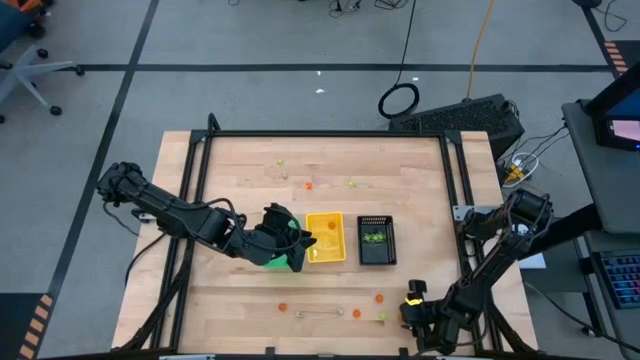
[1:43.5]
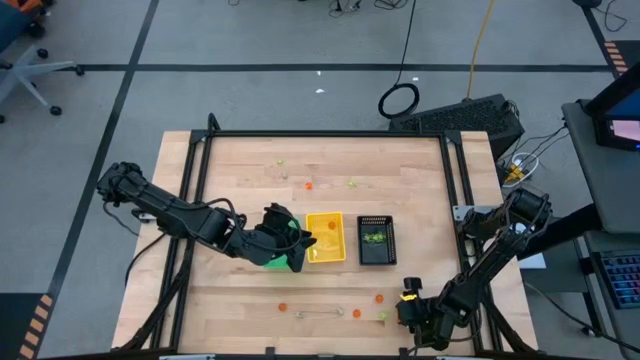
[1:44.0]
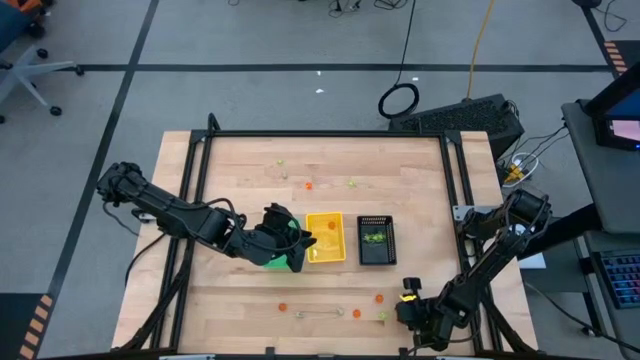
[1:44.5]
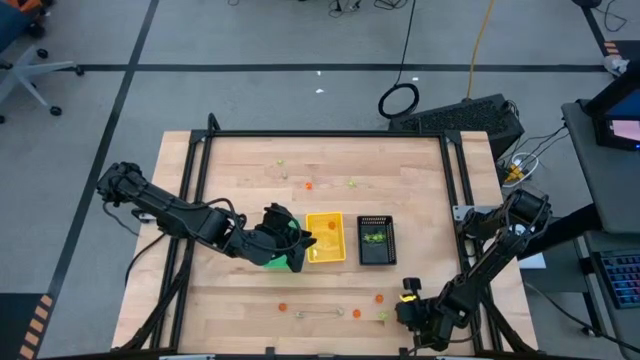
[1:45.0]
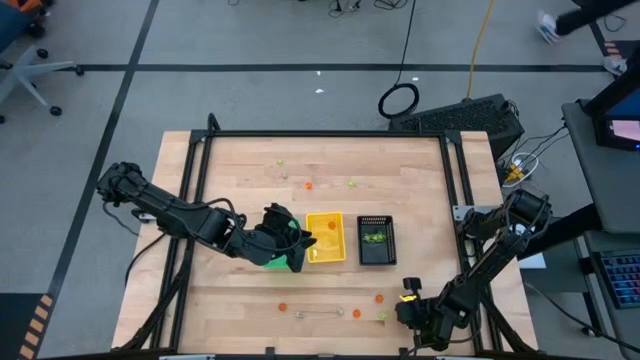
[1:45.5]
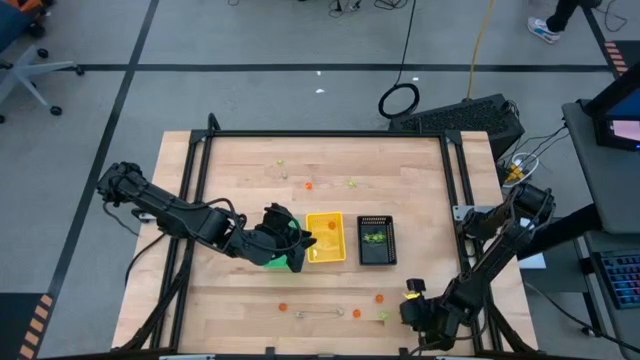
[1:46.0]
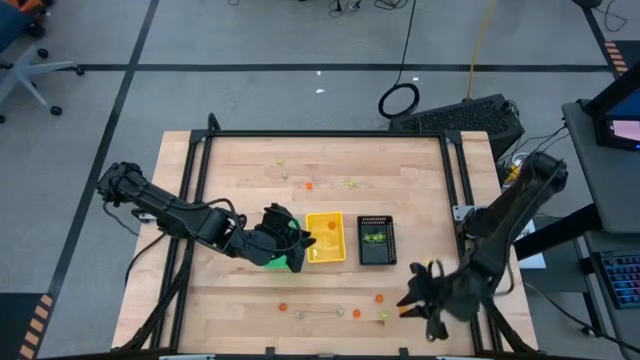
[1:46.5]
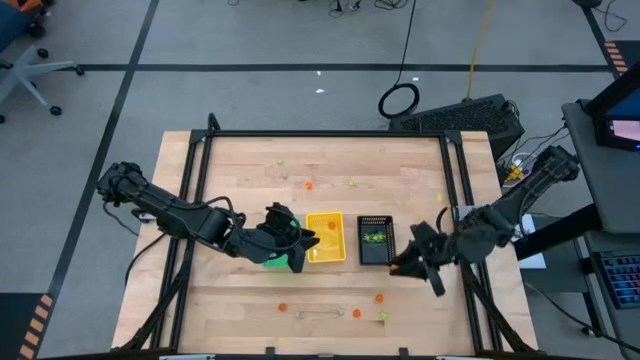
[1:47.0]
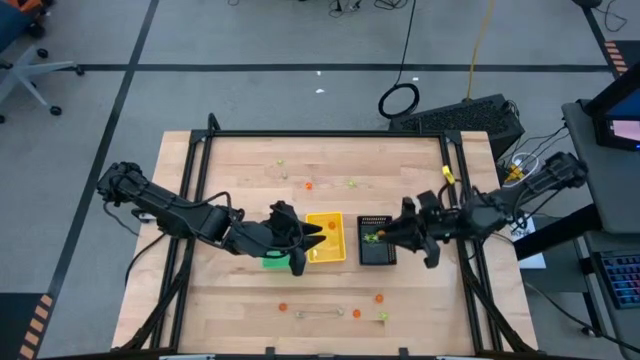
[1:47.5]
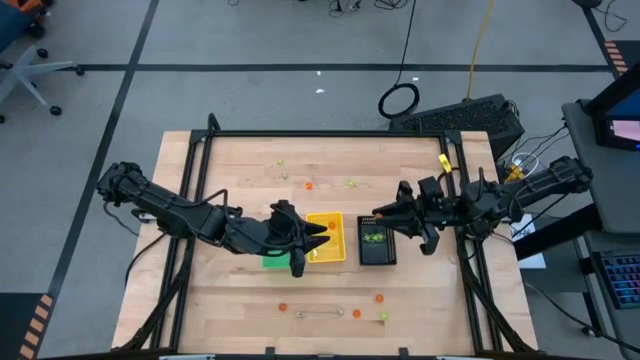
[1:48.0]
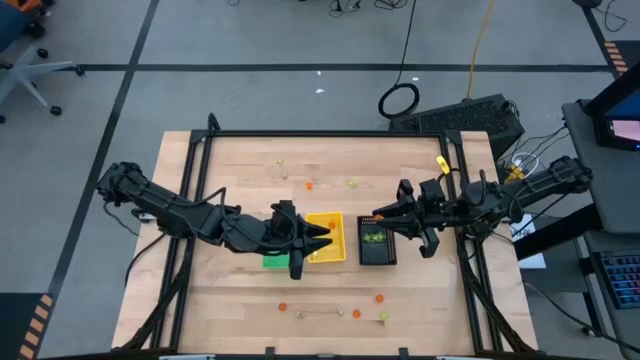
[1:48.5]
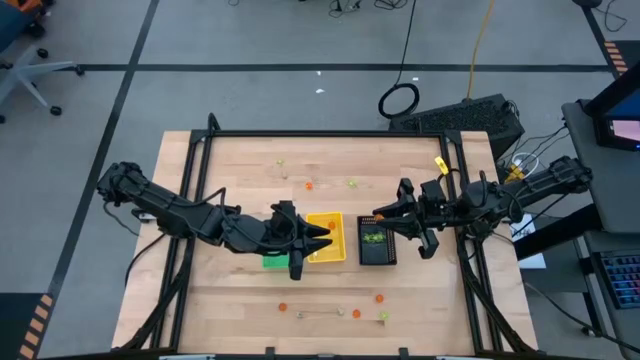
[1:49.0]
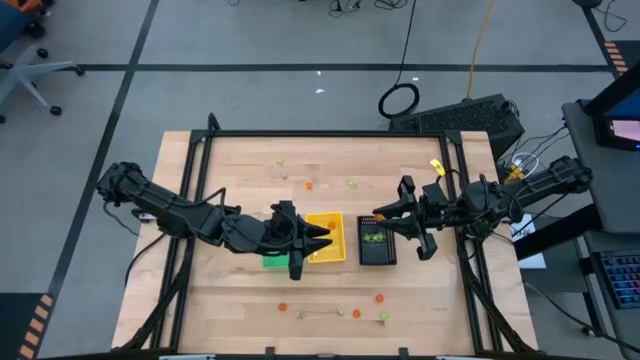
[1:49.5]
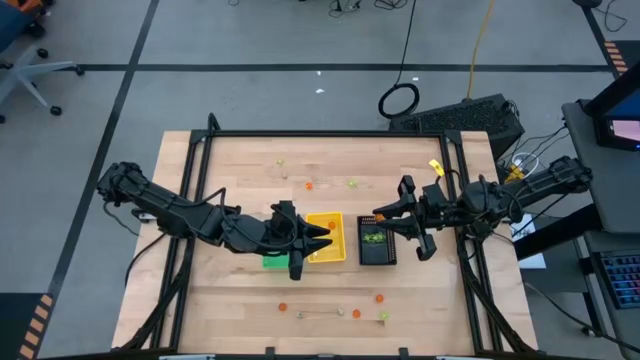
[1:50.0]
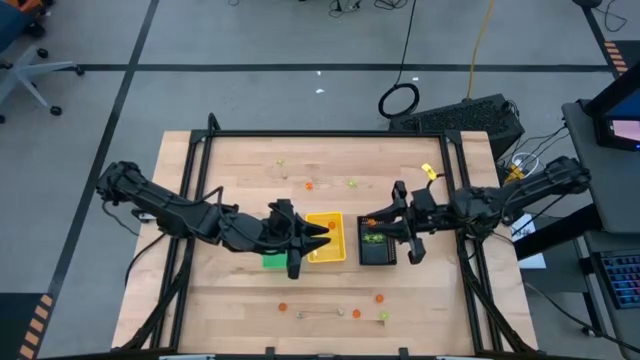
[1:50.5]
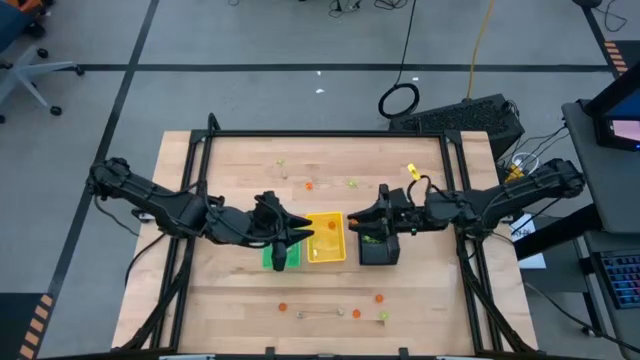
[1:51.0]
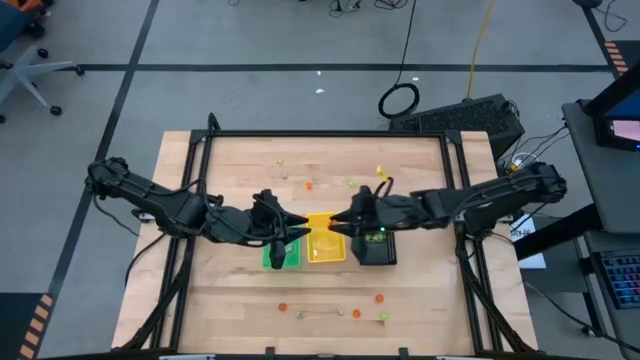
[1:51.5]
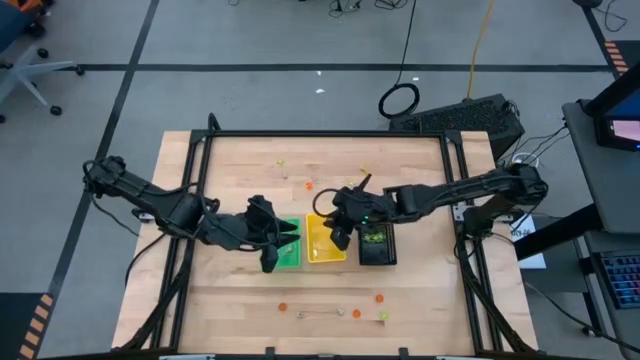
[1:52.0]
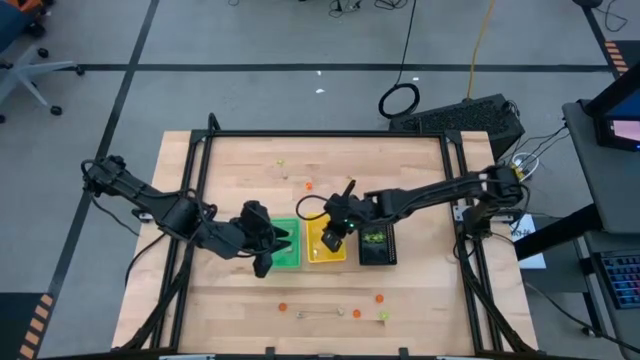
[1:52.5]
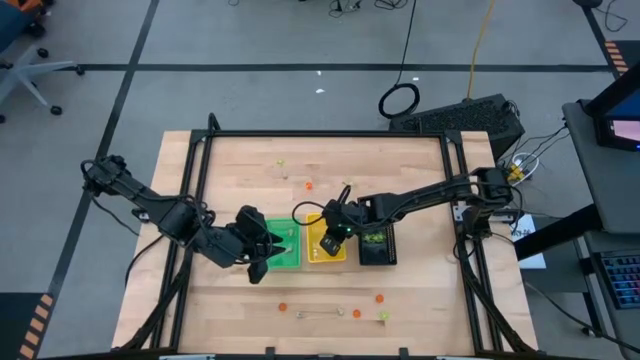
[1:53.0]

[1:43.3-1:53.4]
Task: Sort Halloween decoration
Put the orange pumpkin toy into the yellow basket

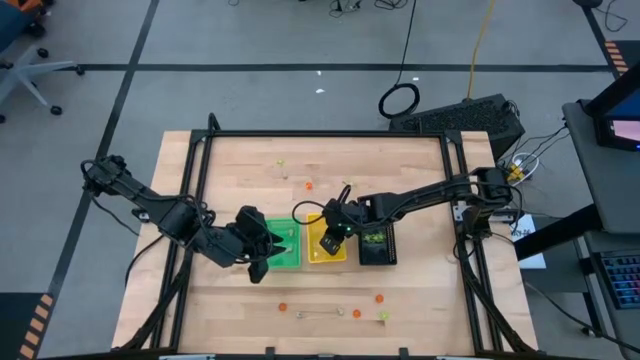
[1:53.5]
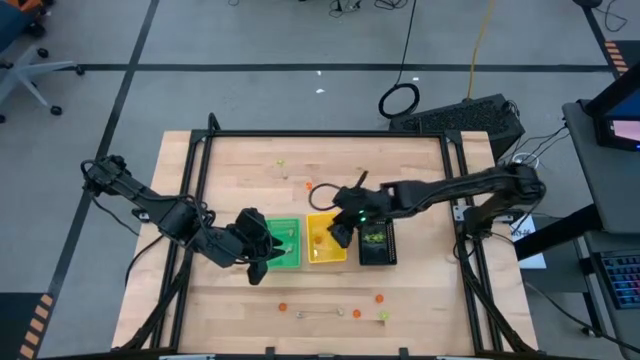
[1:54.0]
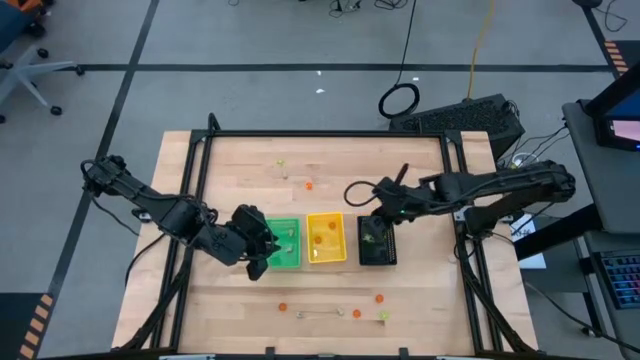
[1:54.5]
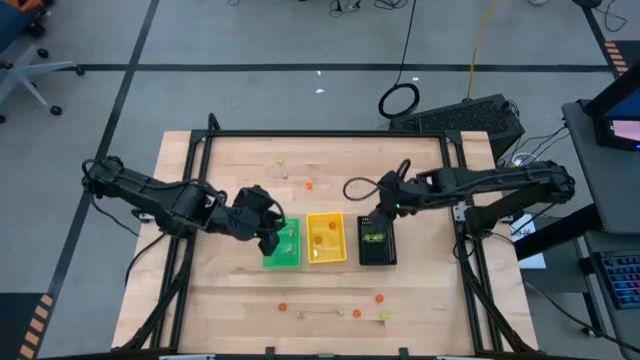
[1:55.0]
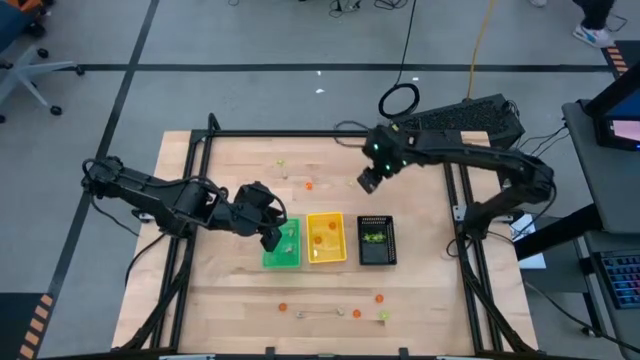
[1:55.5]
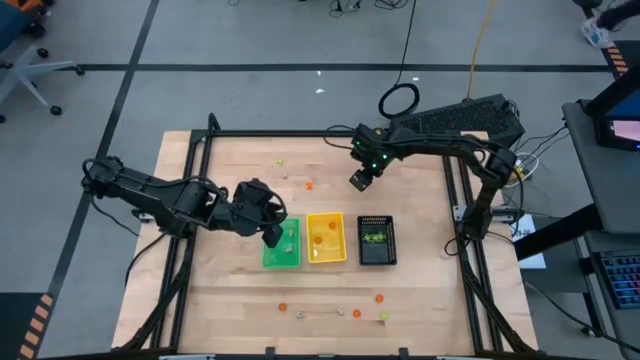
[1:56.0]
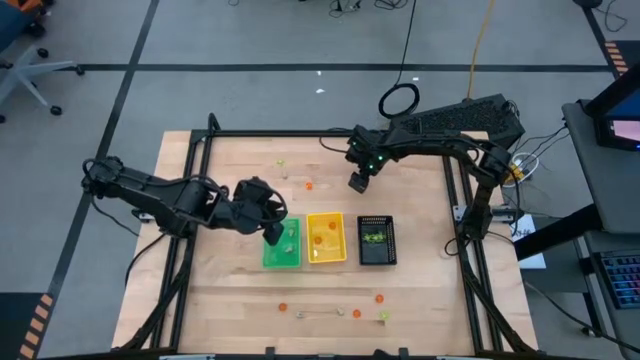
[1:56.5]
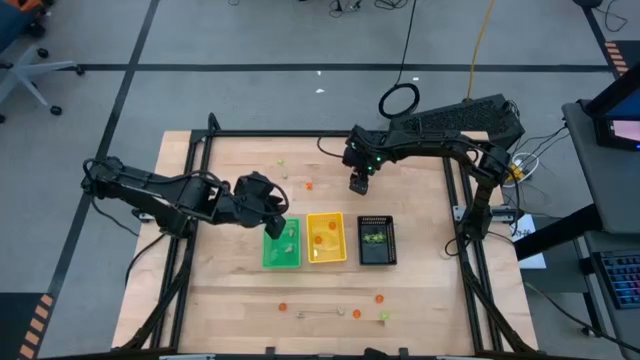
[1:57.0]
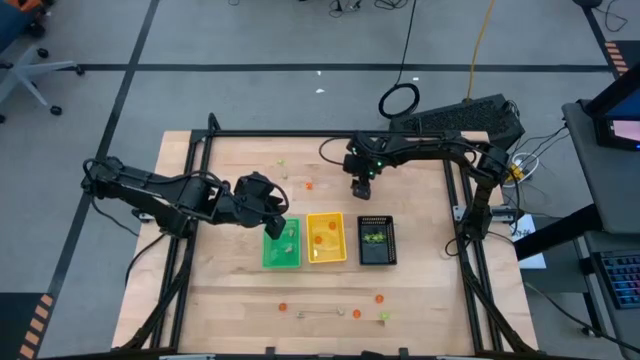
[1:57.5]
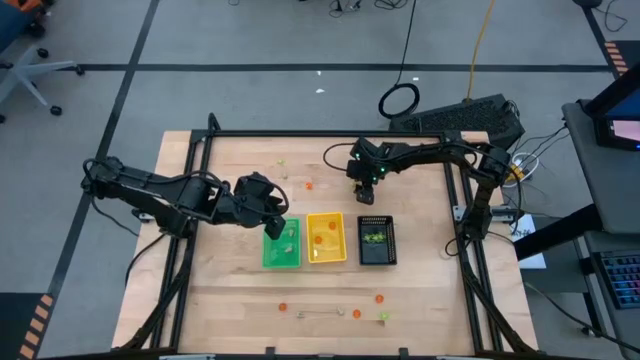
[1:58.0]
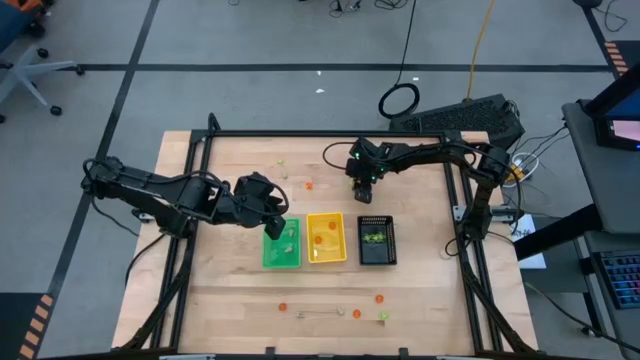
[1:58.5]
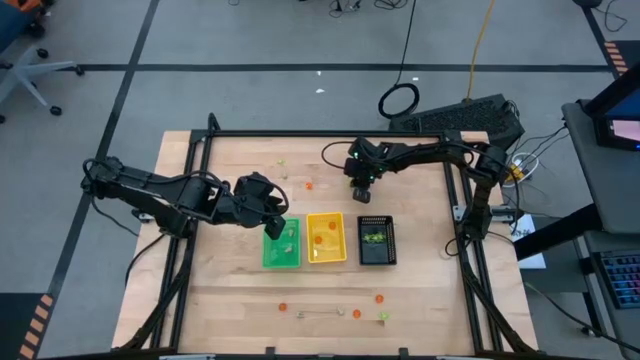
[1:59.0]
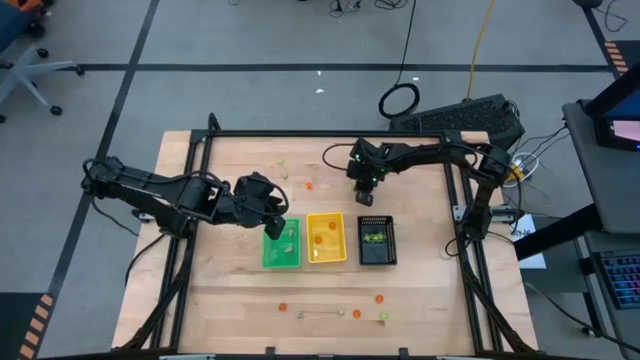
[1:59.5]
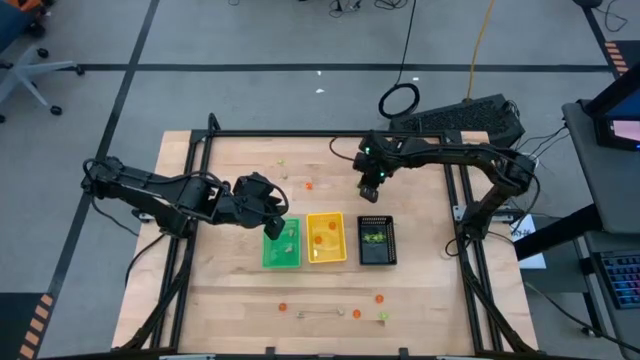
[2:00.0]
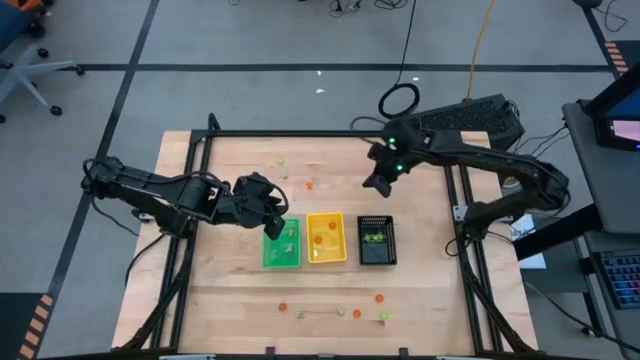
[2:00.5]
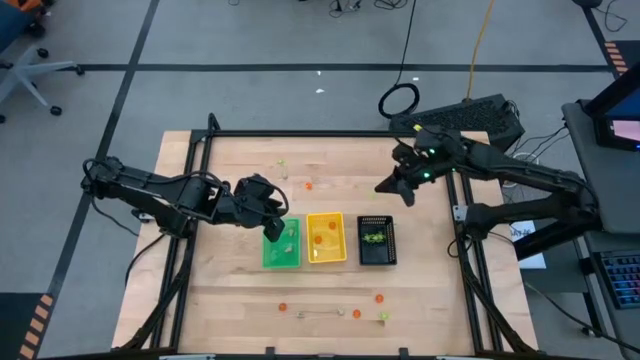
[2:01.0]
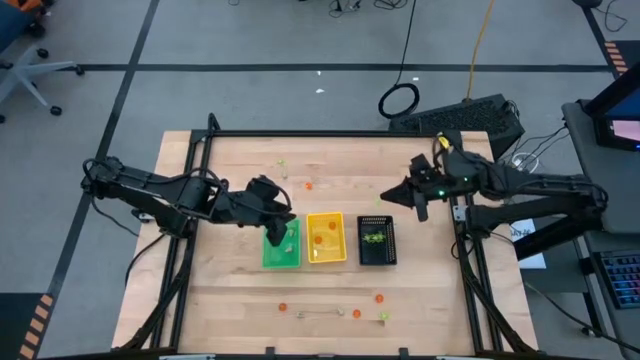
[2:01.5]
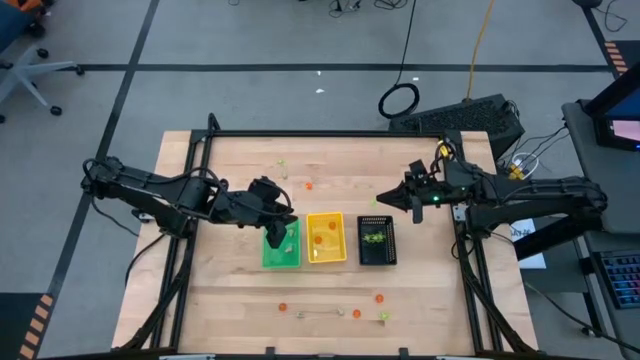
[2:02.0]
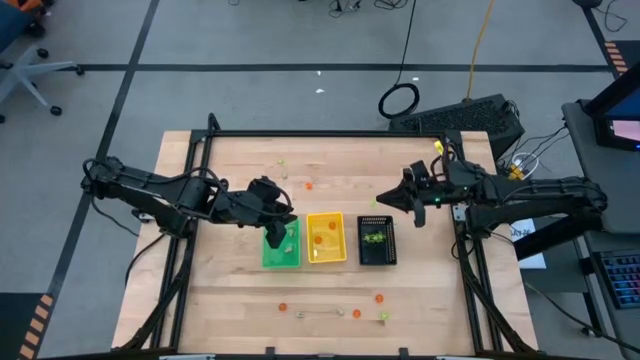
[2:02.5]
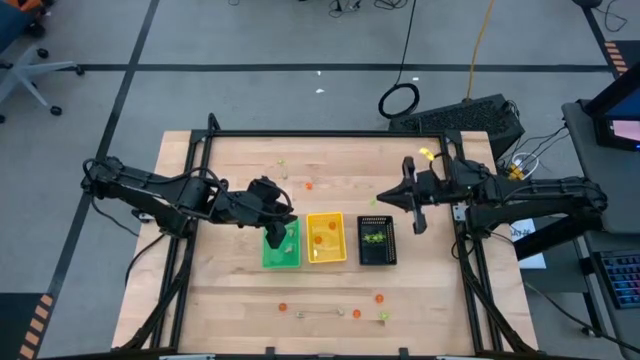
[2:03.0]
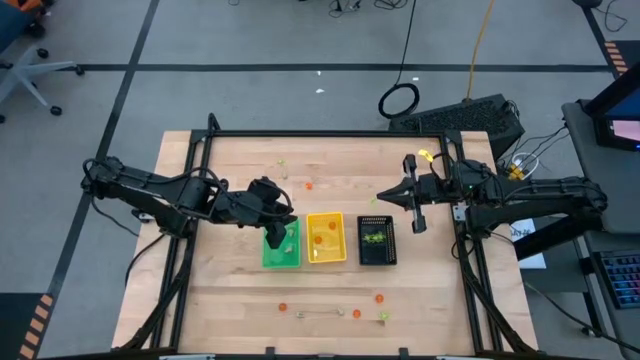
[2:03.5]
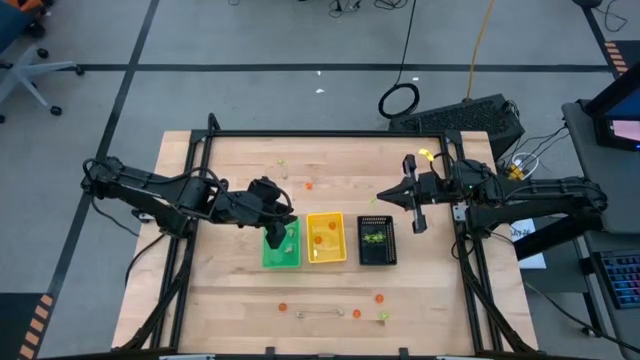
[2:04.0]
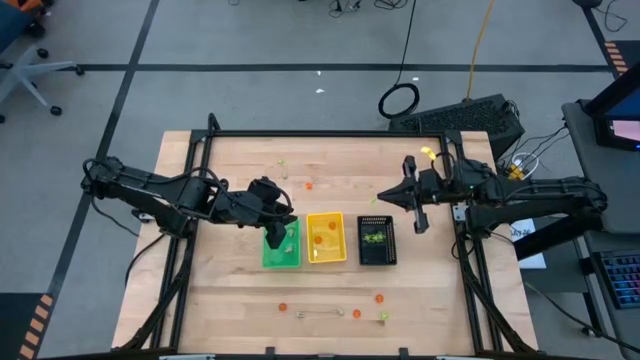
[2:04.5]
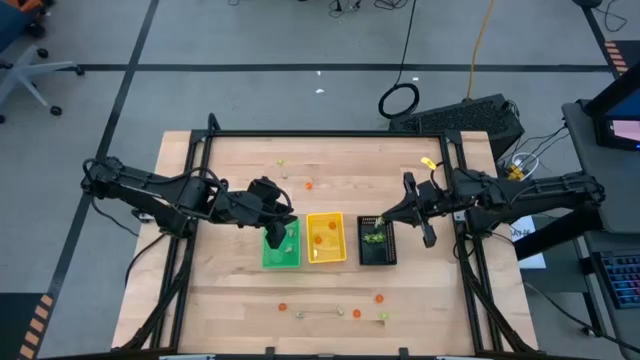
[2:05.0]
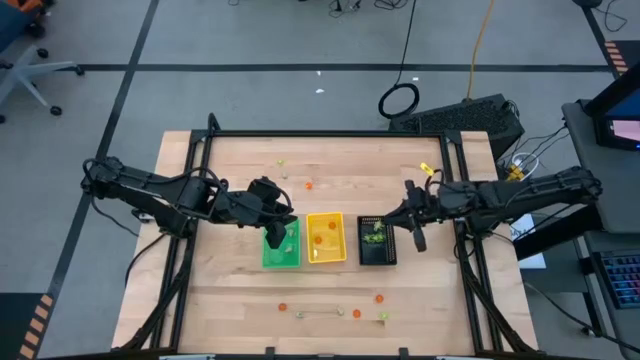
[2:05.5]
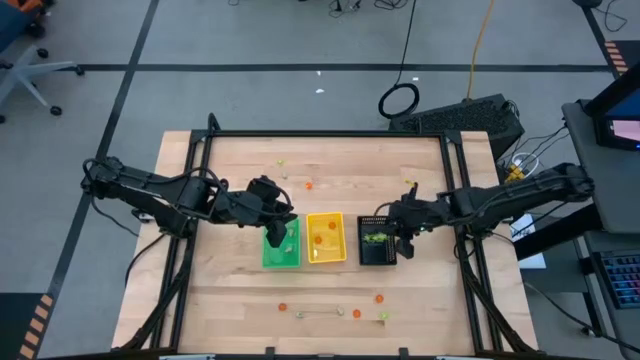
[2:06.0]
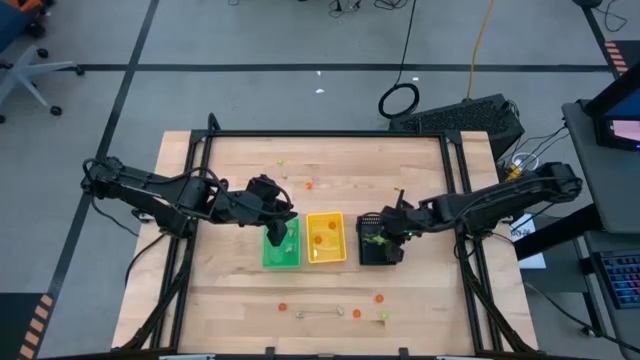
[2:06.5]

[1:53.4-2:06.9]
Put the green spider toy into the black basket
